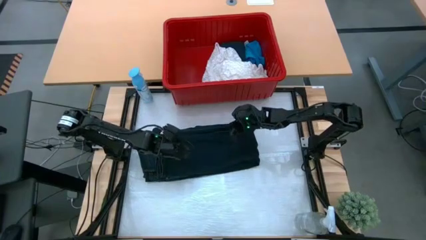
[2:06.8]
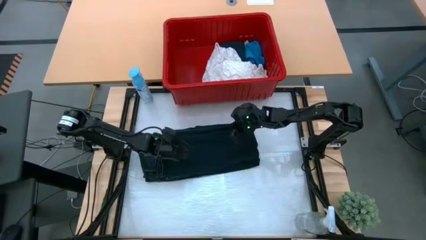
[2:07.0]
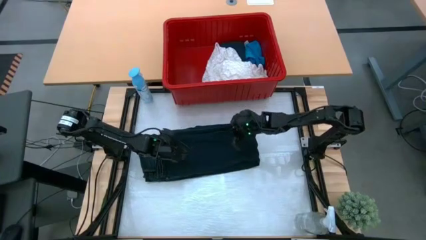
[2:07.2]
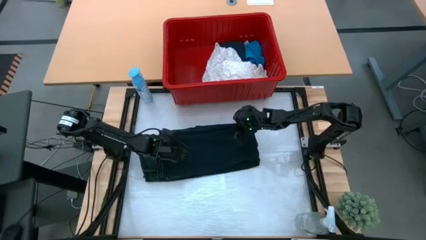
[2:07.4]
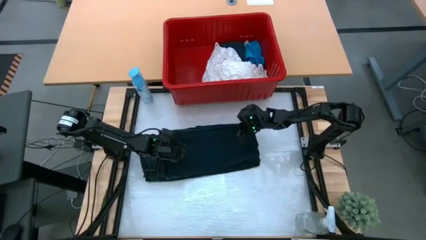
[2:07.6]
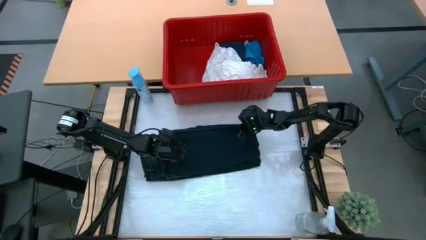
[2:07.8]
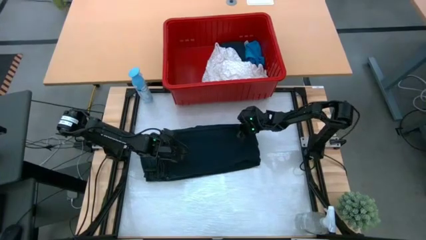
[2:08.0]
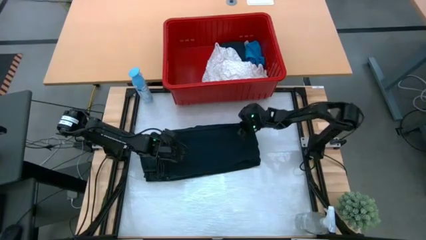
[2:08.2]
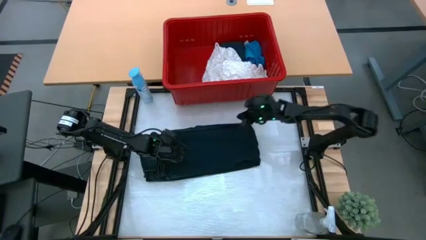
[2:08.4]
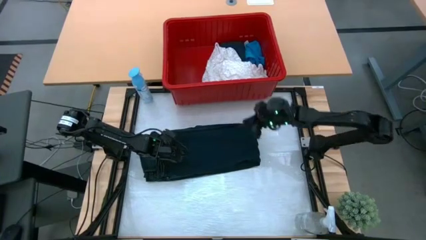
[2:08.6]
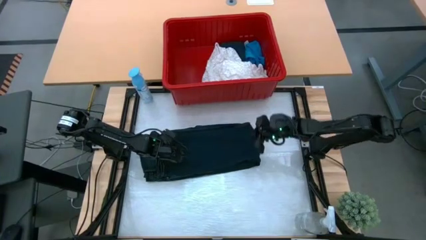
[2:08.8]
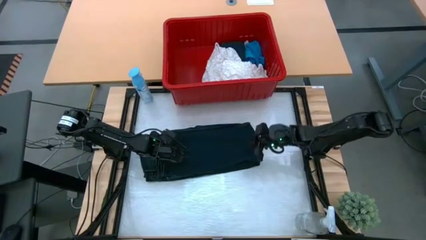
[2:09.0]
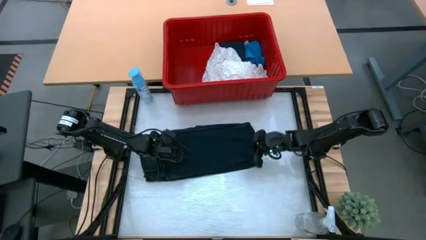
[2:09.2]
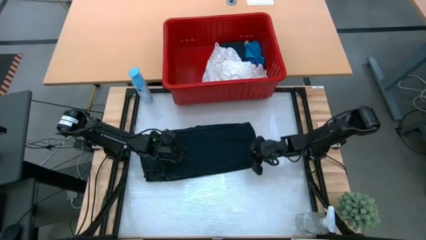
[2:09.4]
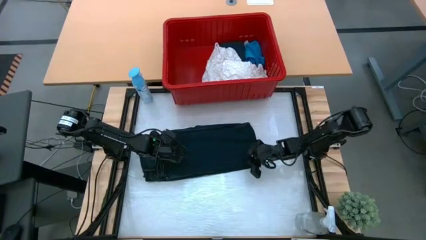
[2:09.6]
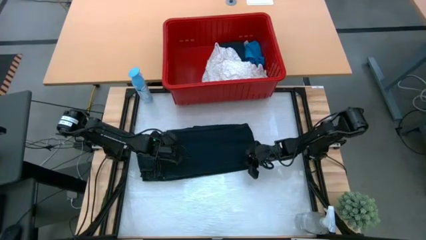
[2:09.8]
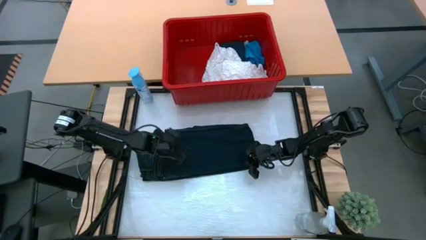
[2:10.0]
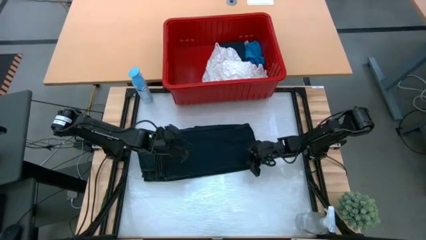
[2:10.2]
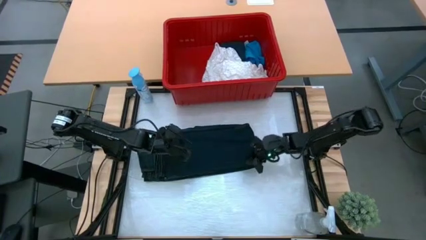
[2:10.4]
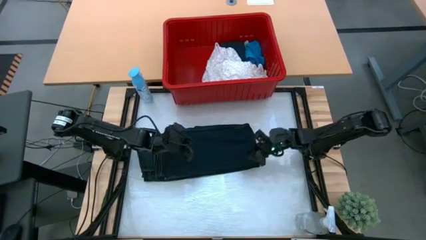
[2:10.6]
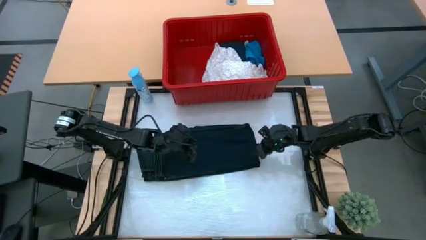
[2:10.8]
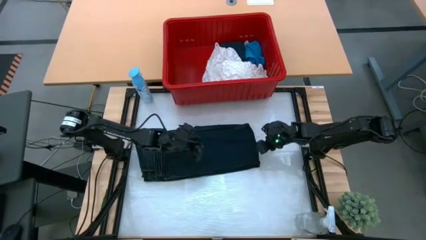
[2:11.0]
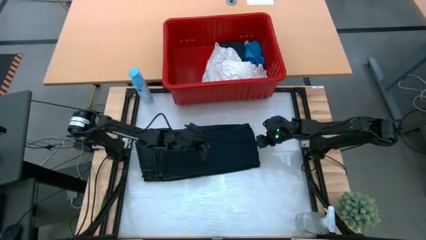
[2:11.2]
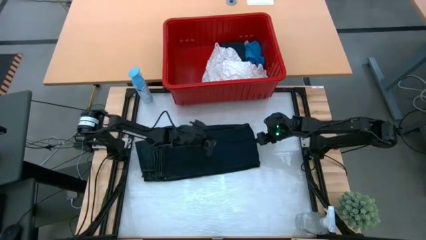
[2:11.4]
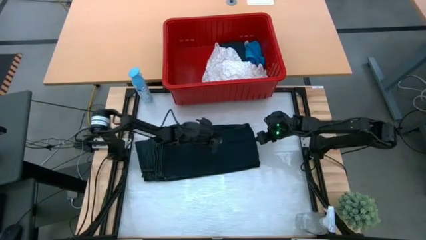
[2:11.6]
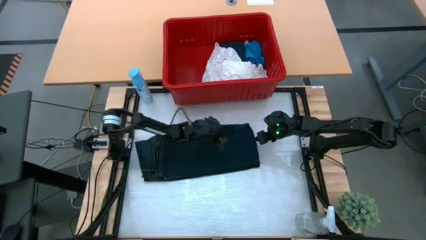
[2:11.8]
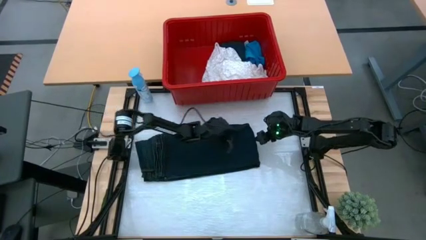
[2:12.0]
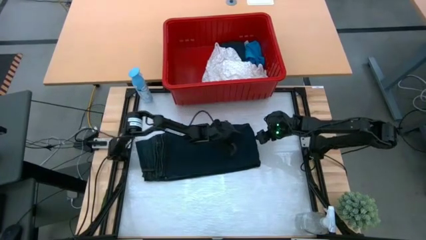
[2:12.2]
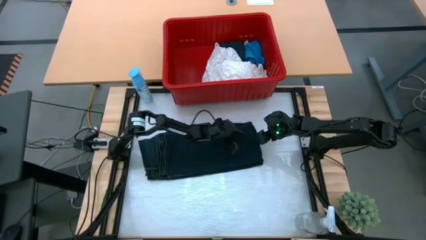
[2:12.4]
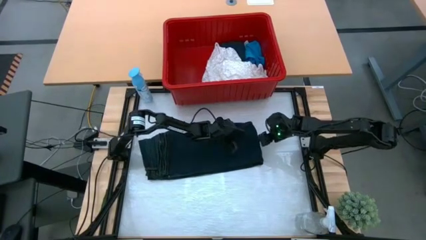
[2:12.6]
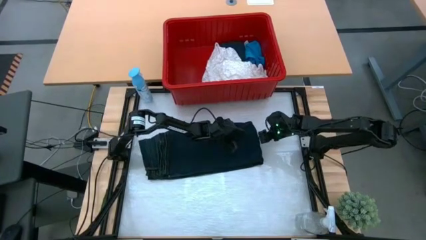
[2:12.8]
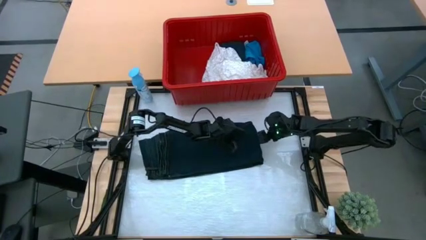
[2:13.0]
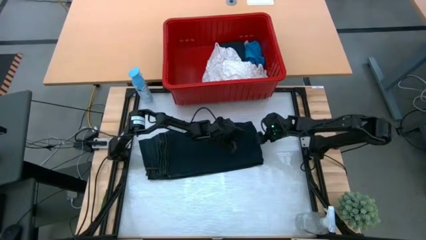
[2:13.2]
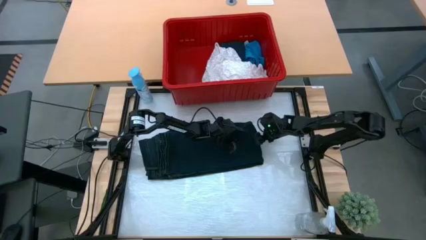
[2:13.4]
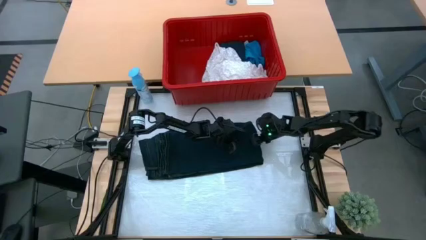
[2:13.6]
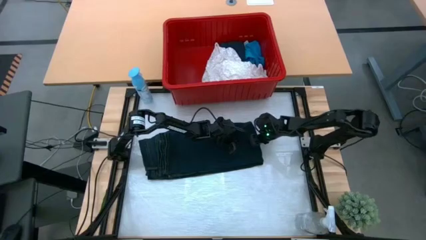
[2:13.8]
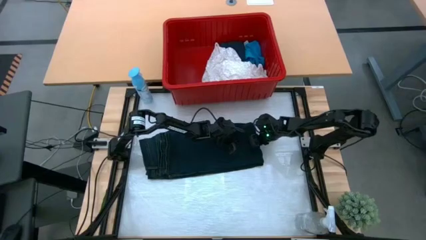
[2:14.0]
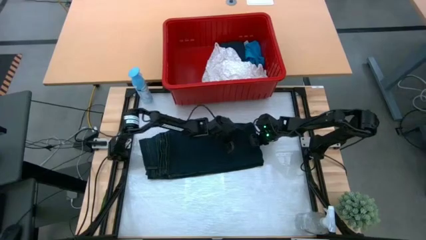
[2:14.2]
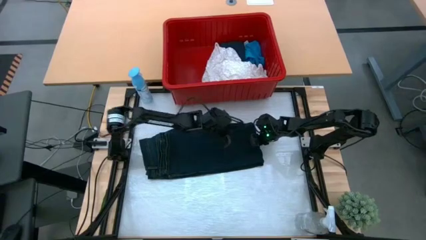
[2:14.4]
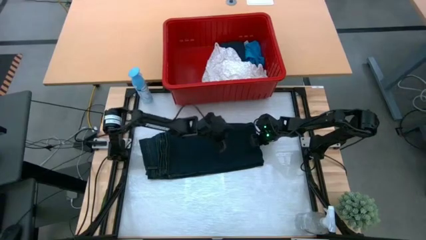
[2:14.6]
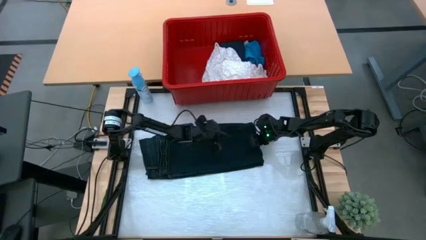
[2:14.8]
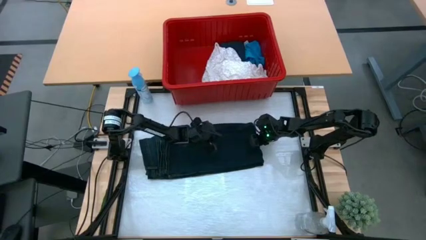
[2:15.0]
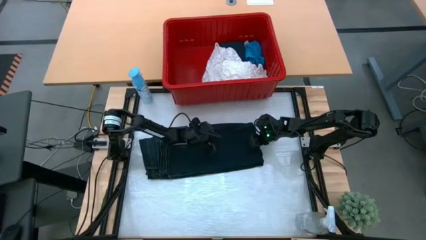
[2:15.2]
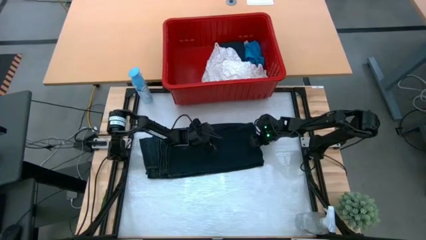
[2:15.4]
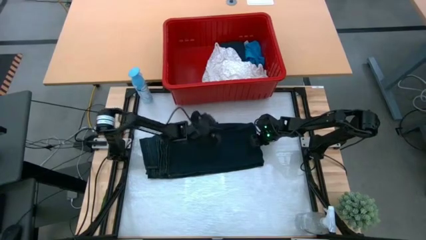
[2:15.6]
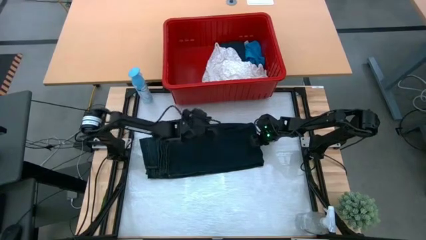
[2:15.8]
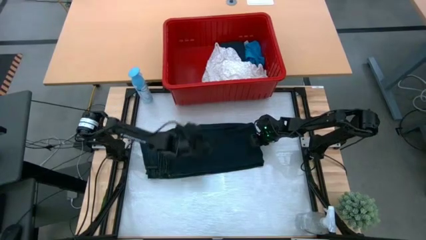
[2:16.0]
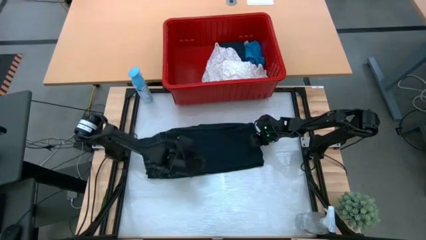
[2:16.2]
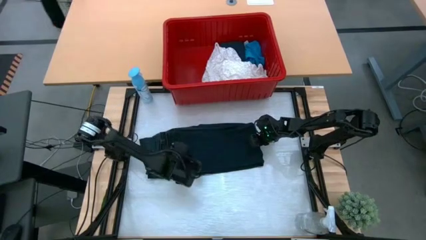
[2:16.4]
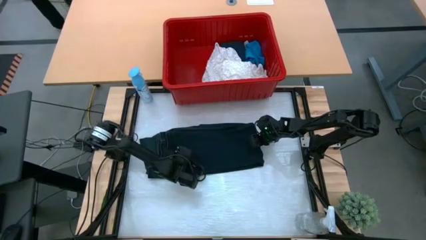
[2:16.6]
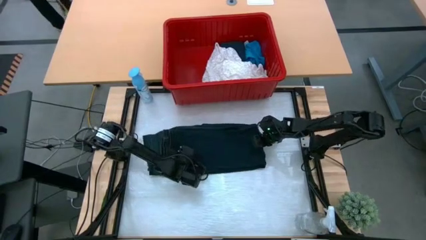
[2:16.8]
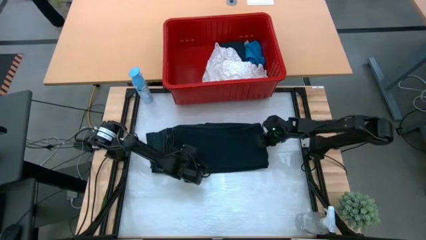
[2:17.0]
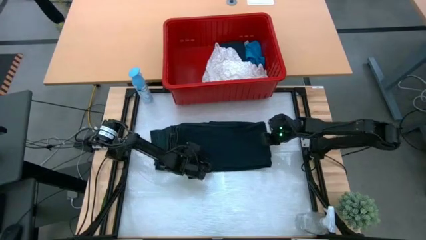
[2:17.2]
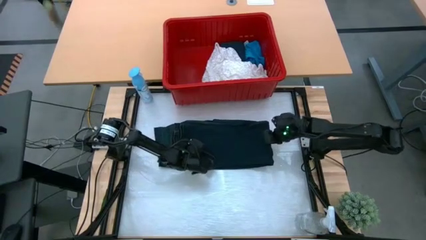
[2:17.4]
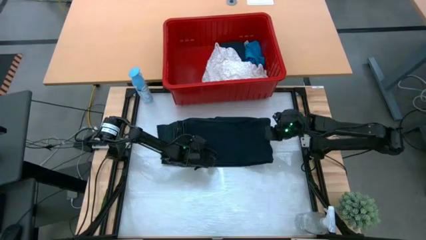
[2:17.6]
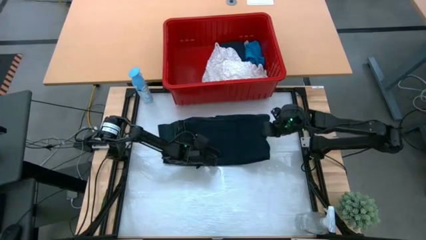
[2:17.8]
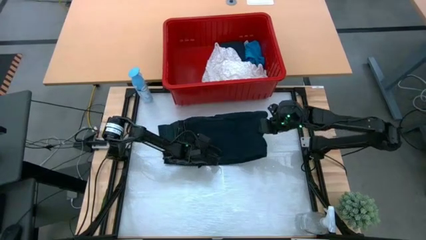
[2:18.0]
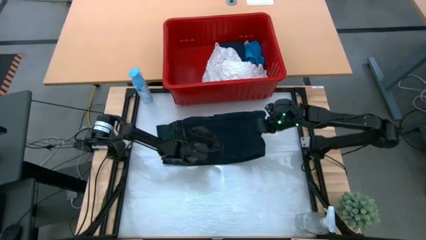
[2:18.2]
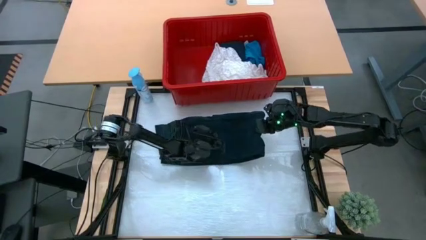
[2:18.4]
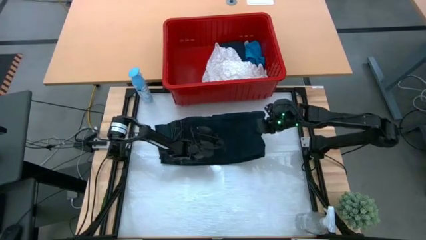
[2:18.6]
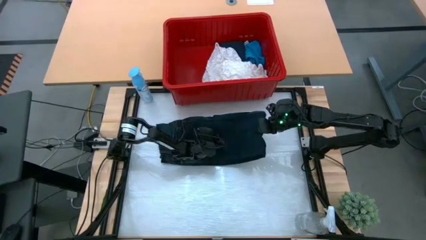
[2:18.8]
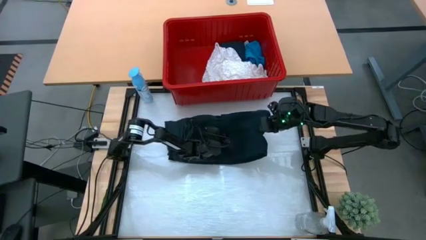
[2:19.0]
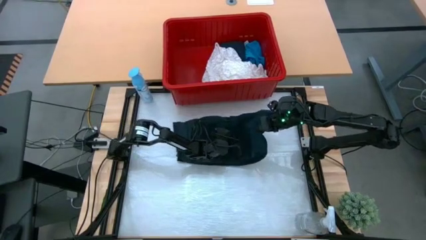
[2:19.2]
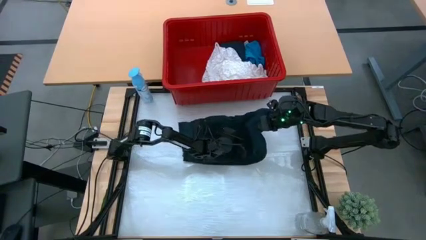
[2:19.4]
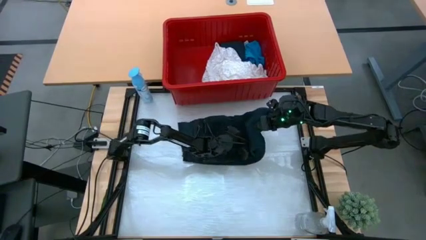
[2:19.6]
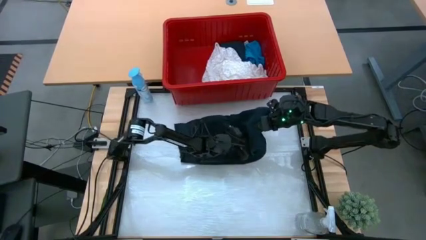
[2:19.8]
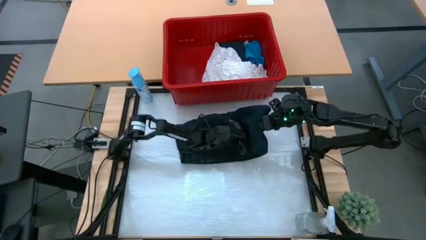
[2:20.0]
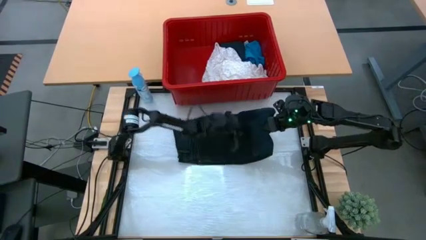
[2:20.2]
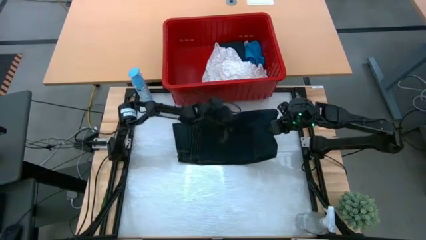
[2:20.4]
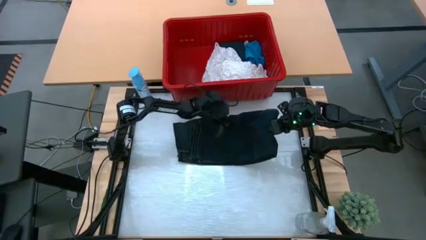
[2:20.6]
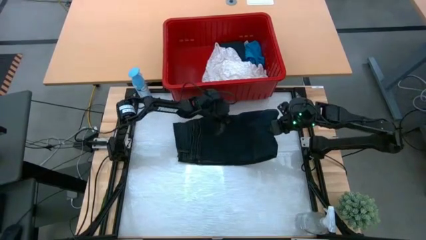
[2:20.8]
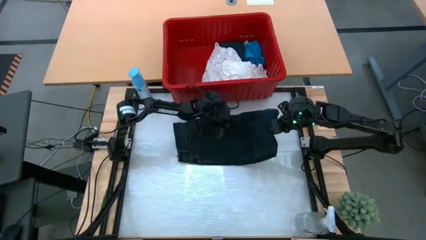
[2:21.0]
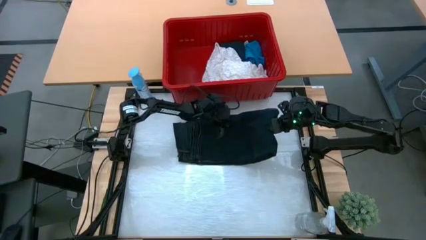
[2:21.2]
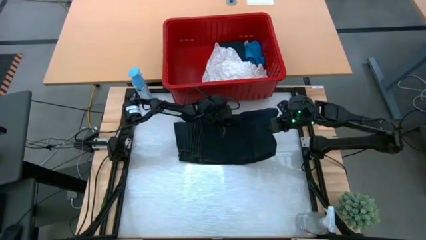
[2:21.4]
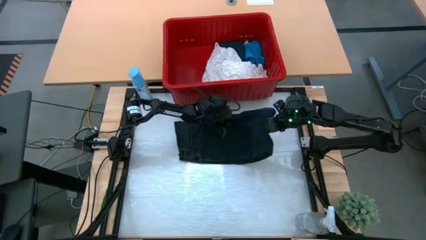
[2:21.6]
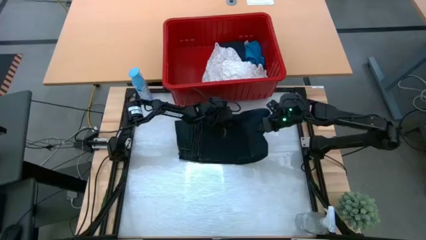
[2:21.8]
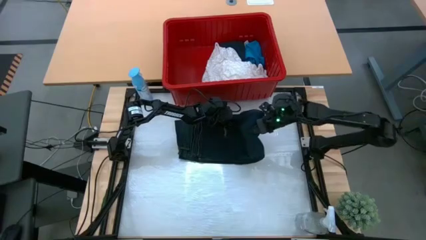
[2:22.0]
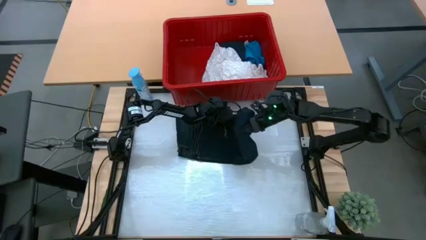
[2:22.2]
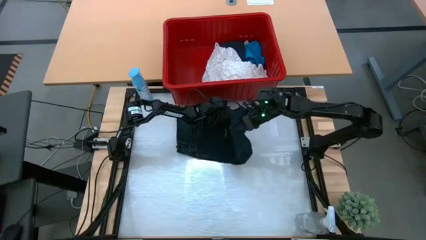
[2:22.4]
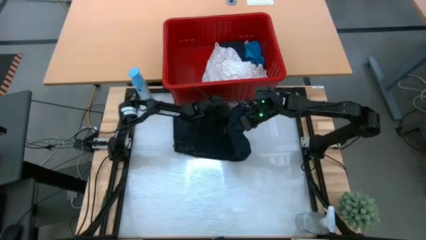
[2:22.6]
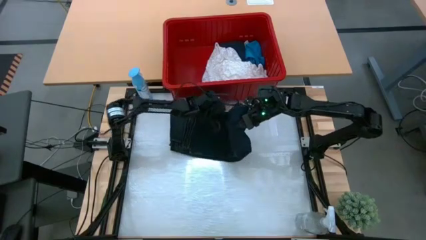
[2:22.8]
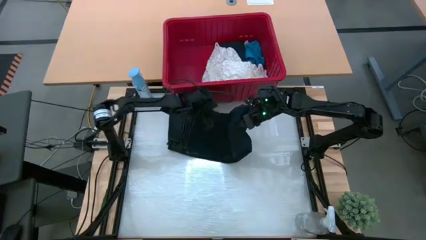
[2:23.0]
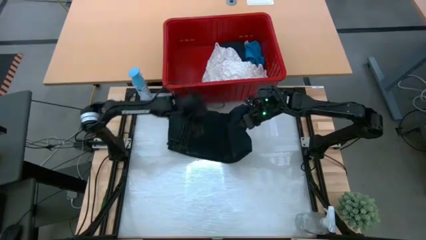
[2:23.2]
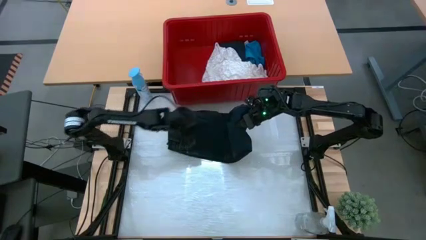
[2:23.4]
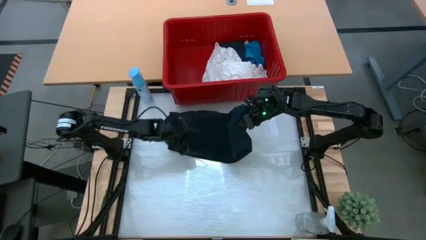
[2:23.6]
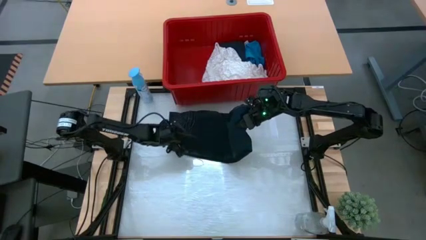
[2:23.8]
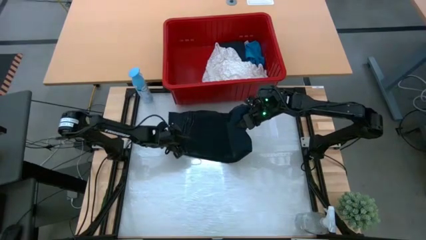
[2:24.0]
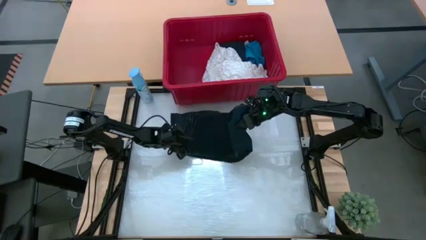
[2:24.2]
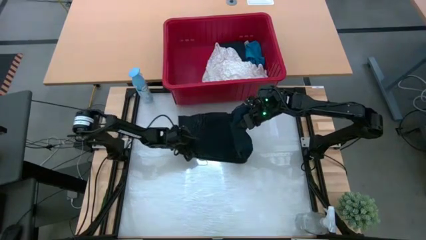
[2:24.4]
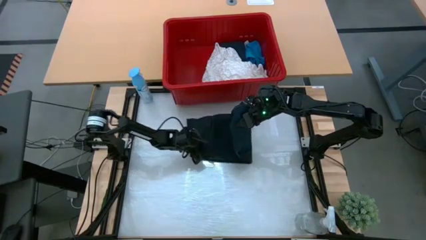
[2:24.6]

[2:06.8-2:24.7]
Task: Fold Laundry from Bin
Fold the black pants from the red bin
